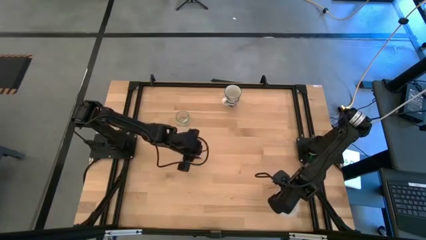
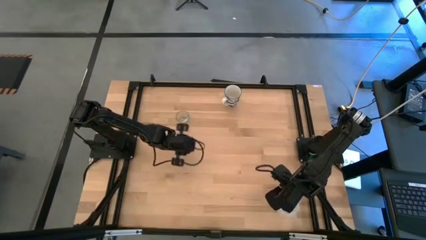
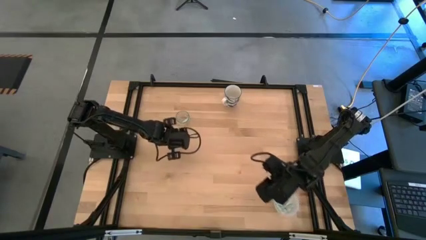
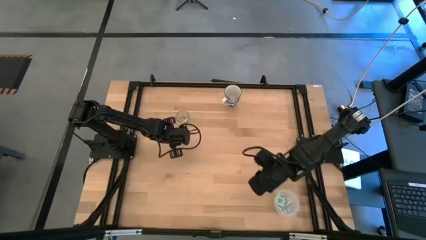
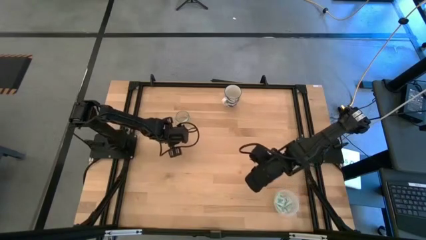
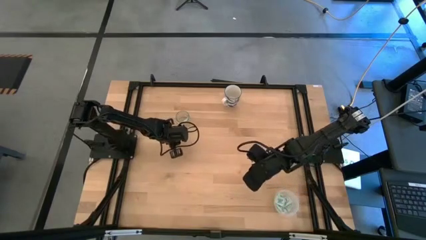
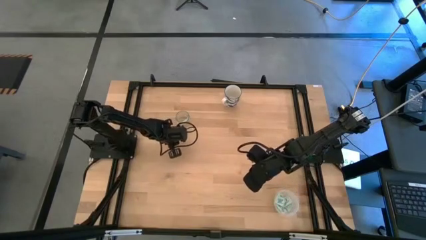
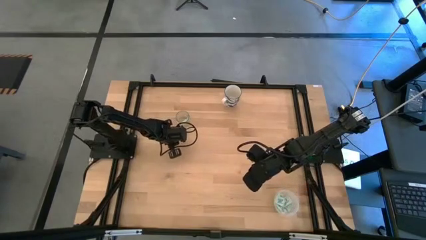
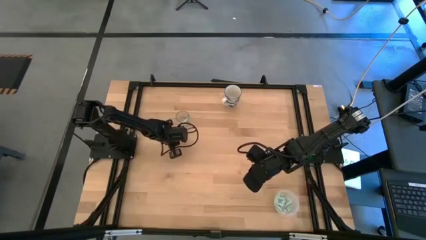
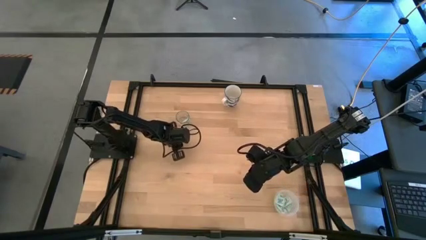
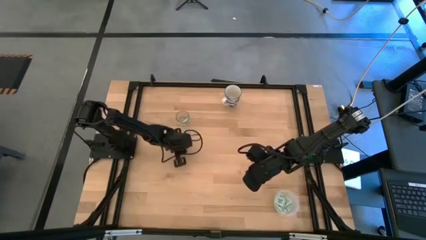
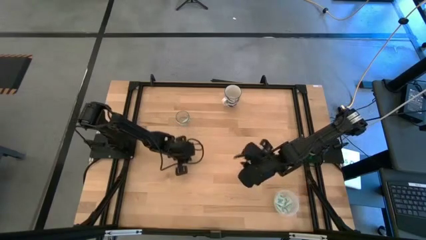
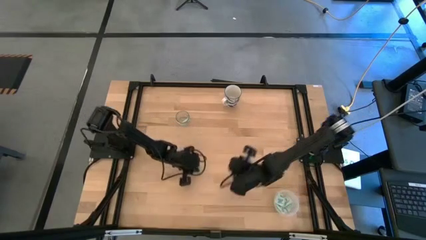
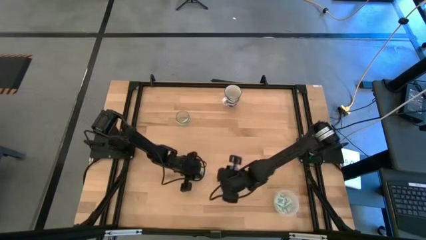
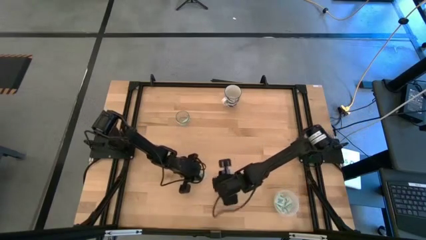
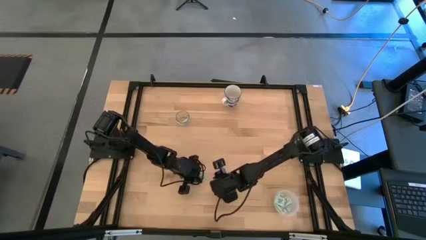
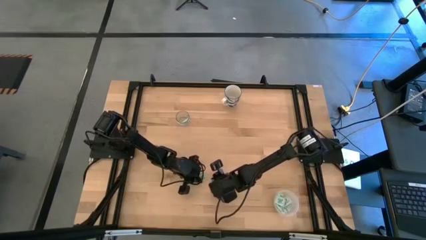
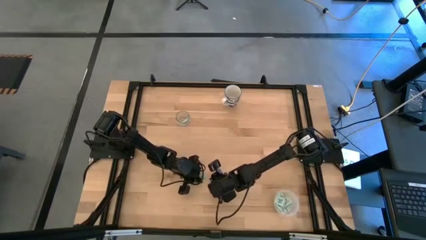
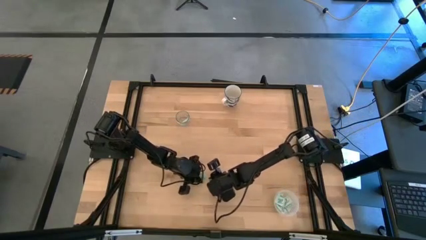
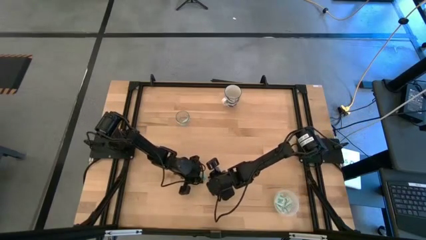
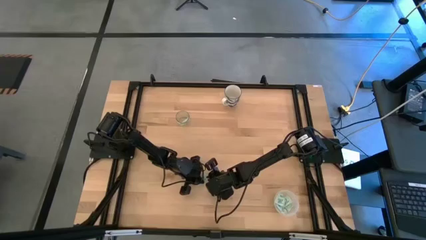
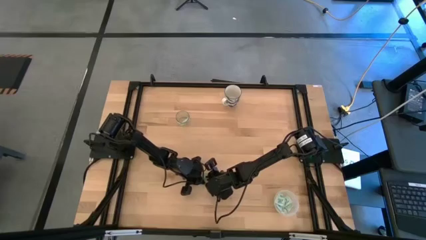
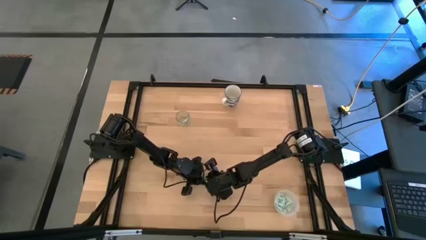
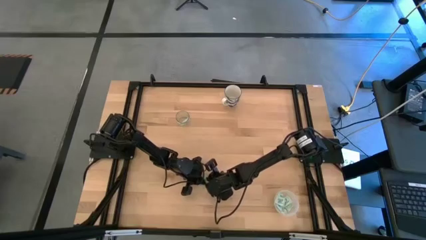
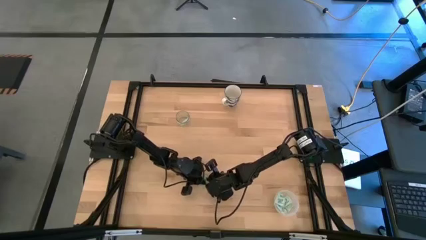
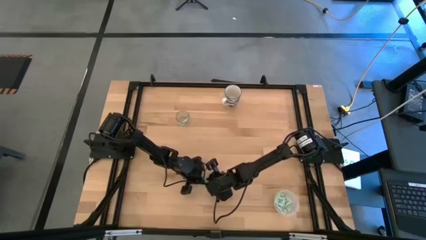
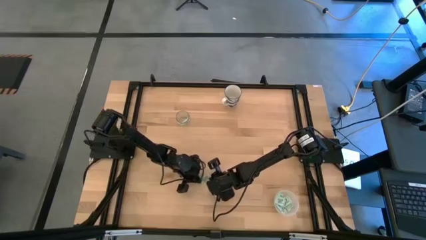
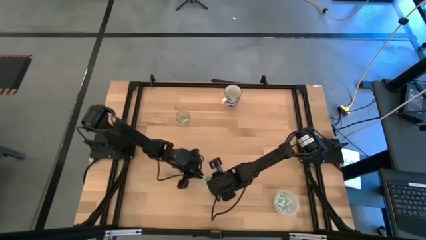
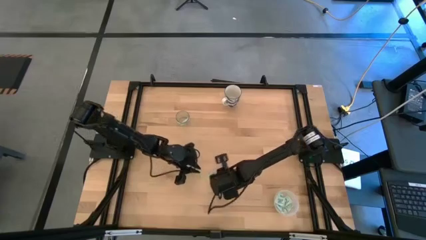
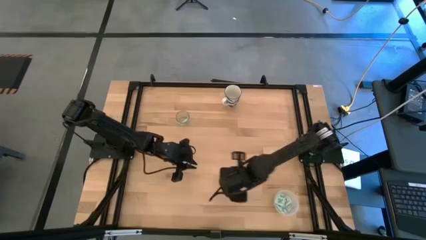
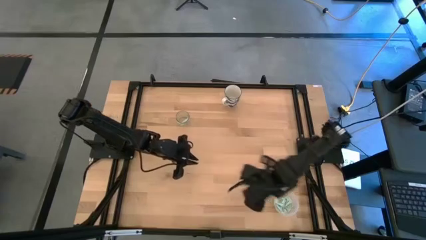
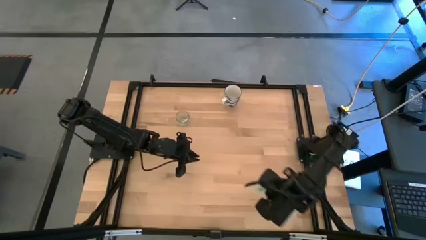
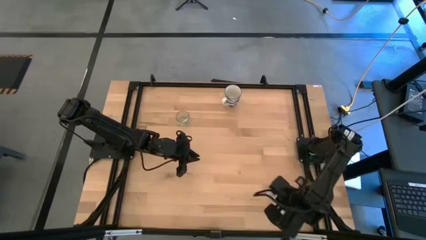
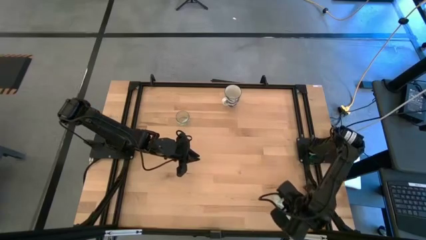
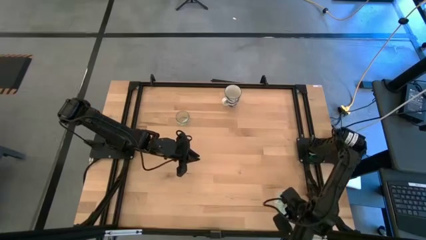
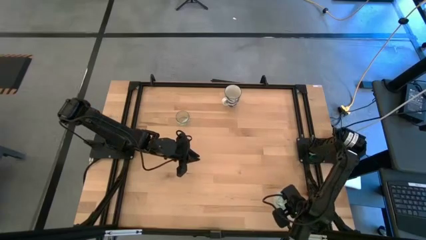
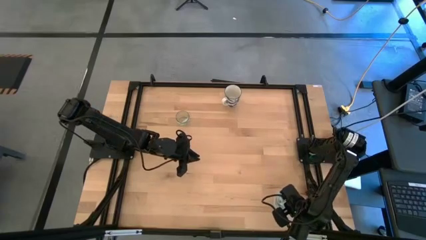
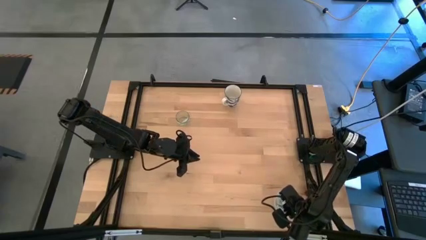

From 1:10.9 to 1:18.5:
Task: Pick and place Stevia / Truvia into bins
Put the green stevia packet into the transparent container

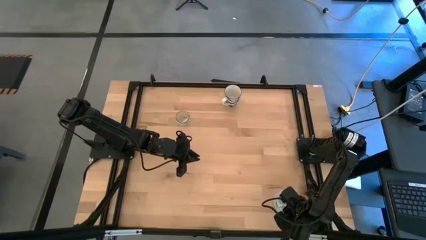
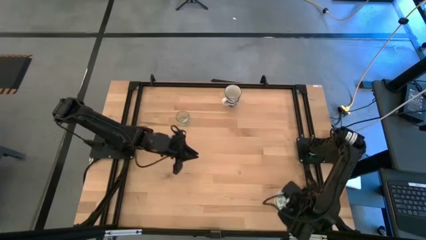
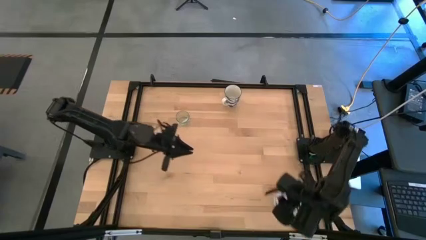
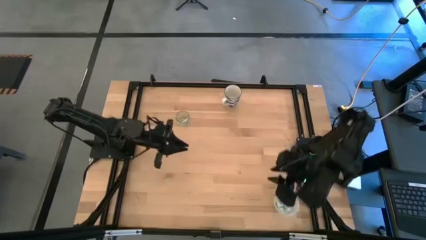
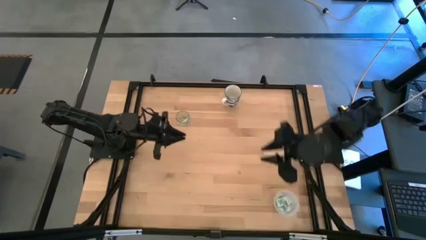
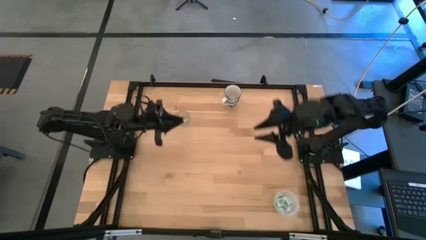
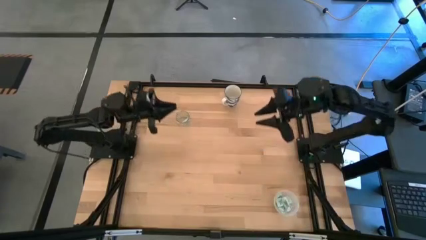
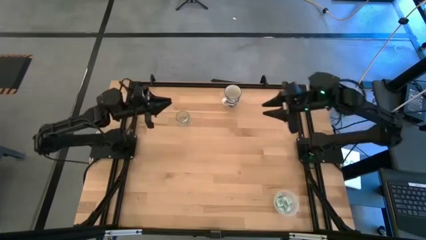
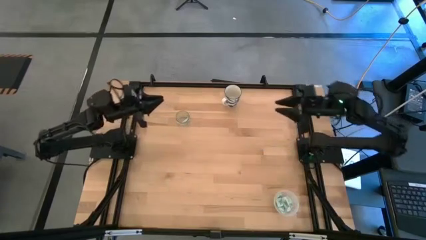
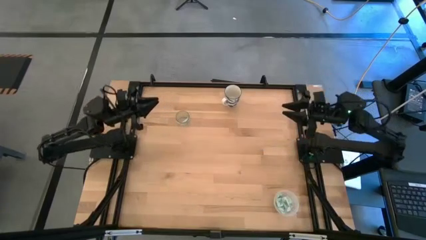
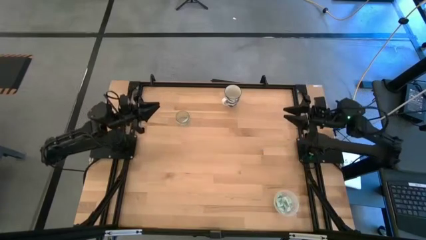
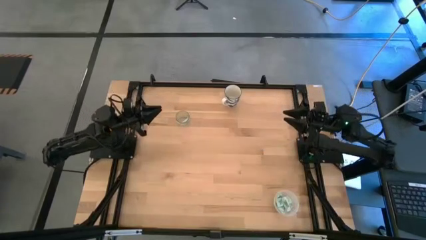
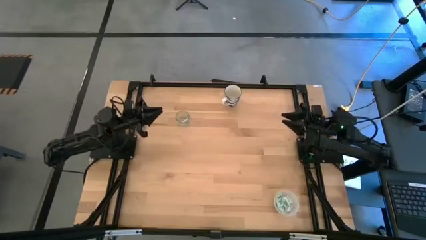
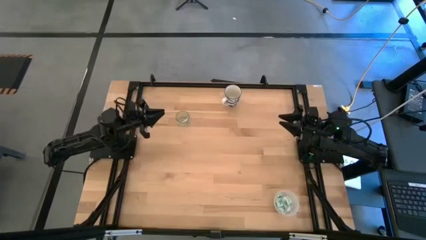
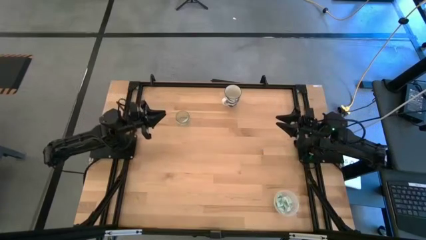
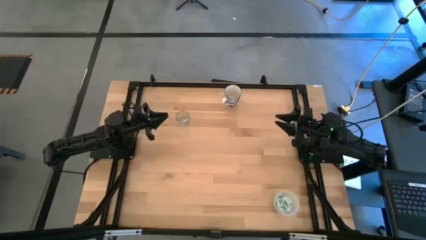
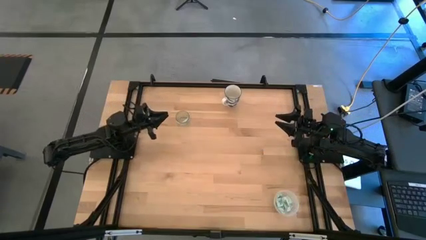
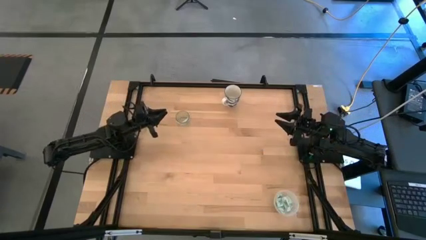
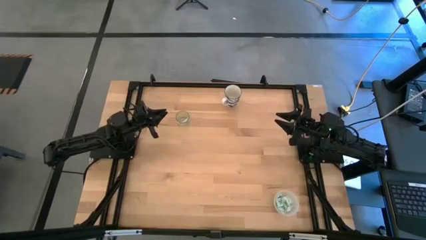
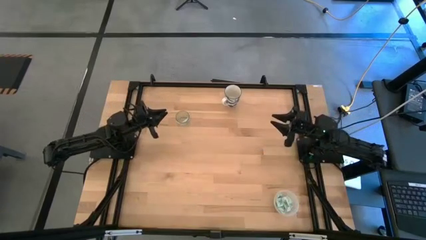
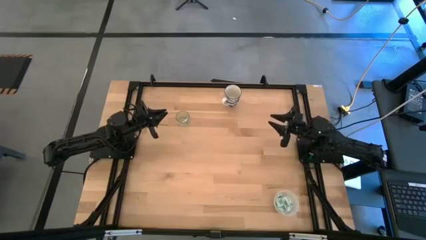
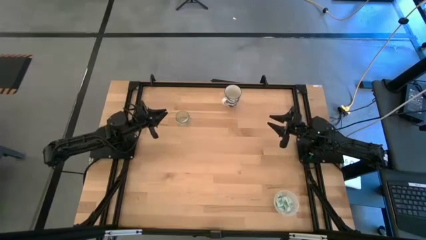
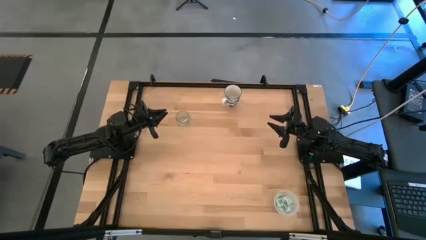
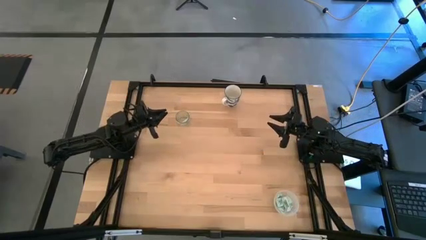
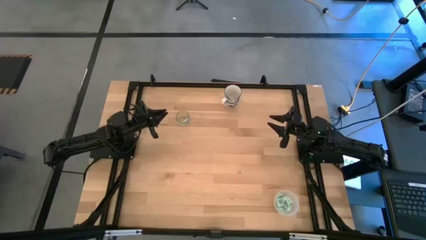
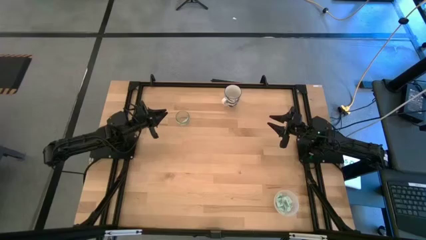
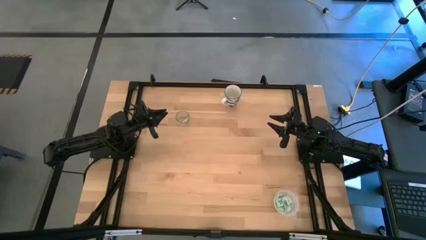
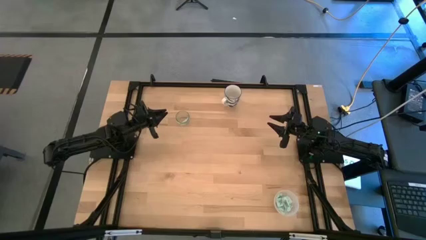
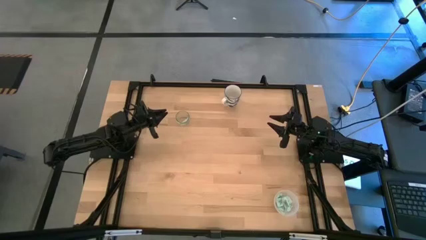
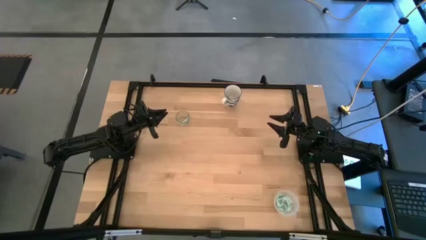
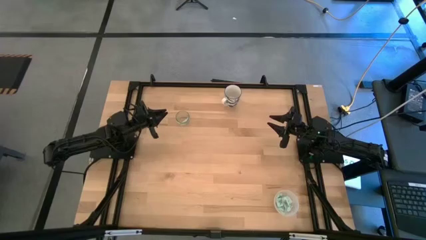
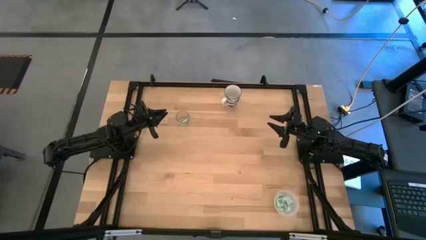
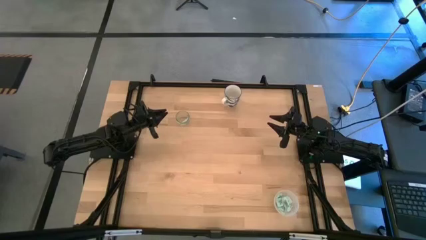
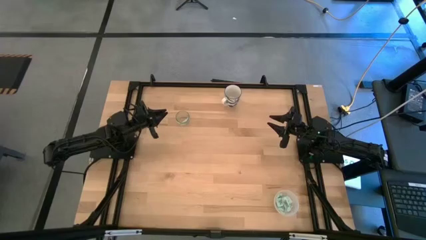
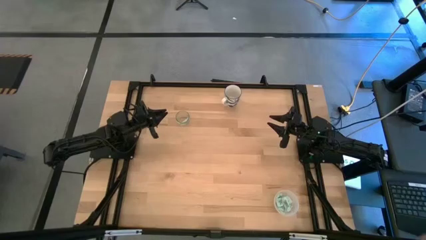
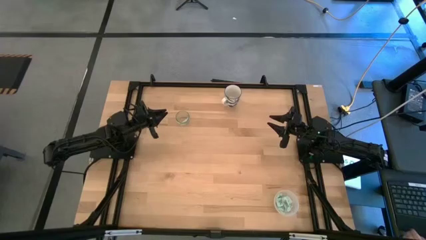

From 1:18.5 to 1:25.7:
Return to Home Position
